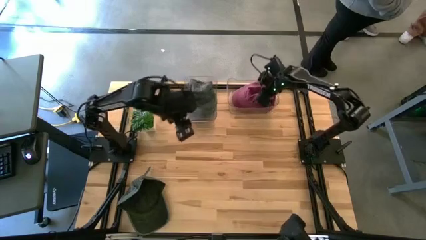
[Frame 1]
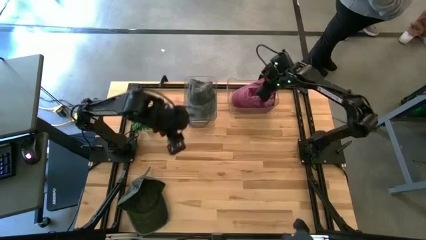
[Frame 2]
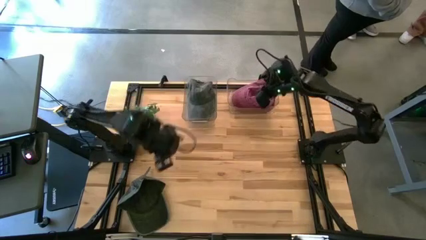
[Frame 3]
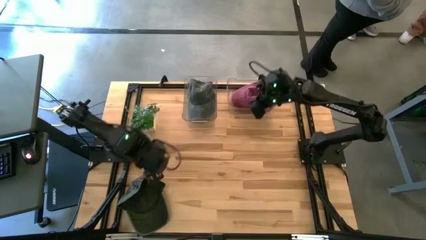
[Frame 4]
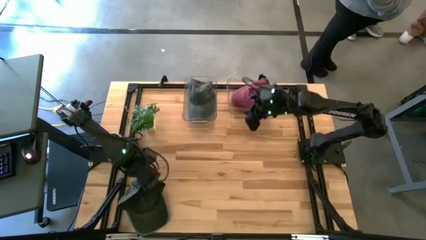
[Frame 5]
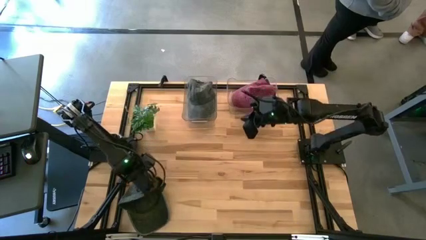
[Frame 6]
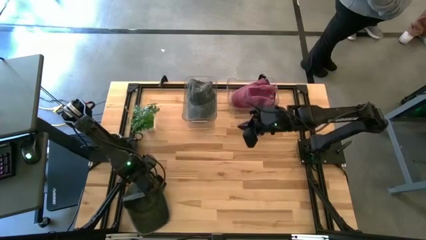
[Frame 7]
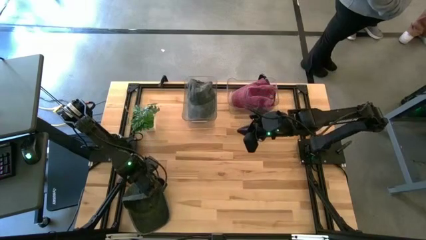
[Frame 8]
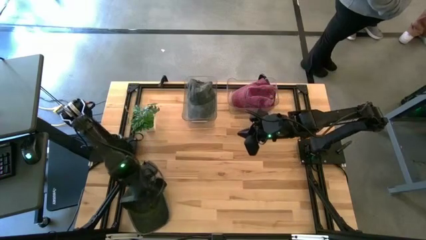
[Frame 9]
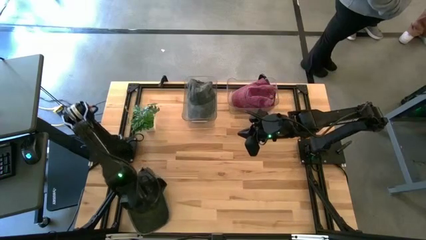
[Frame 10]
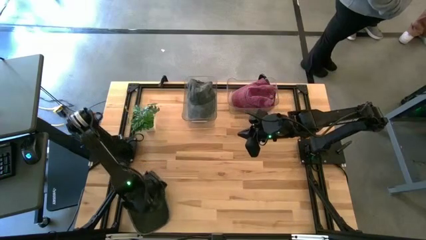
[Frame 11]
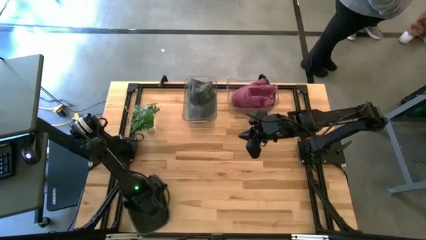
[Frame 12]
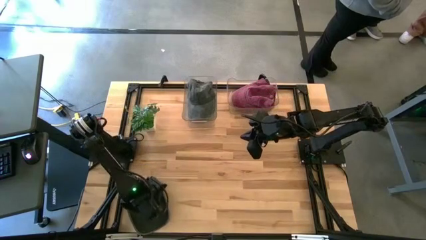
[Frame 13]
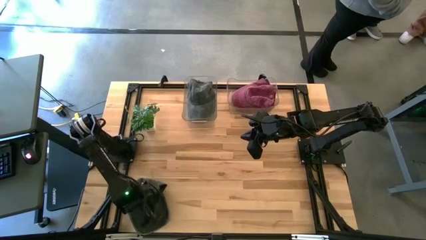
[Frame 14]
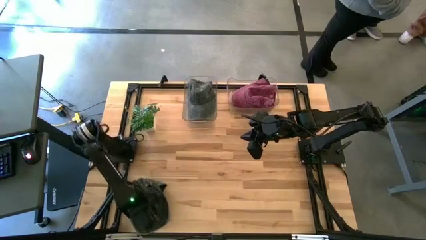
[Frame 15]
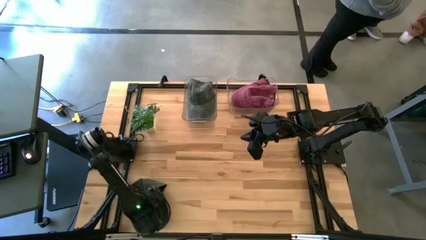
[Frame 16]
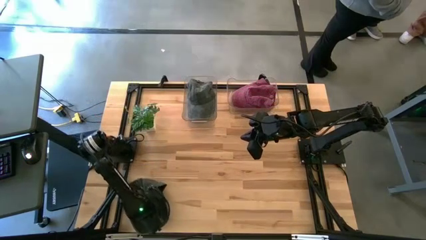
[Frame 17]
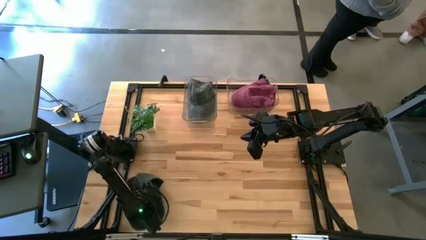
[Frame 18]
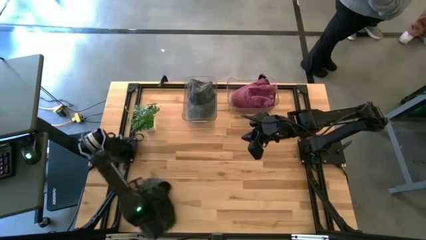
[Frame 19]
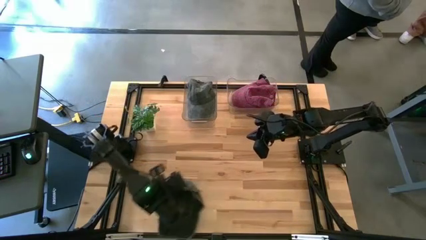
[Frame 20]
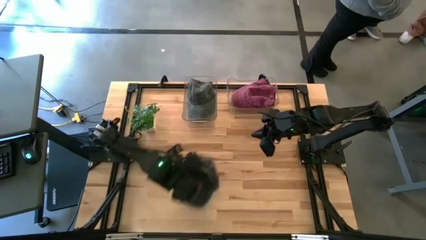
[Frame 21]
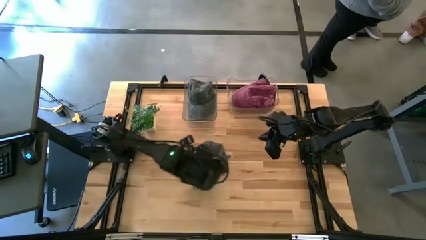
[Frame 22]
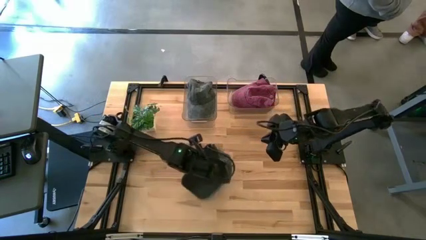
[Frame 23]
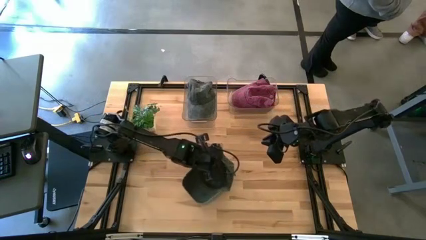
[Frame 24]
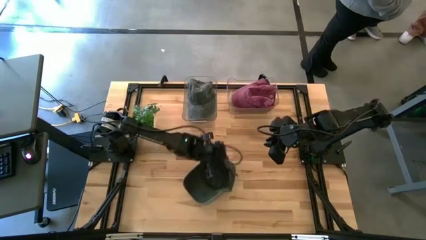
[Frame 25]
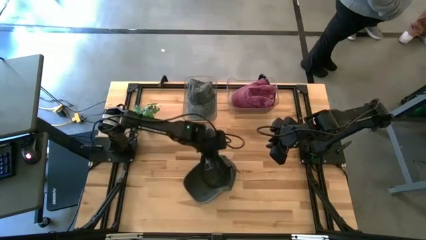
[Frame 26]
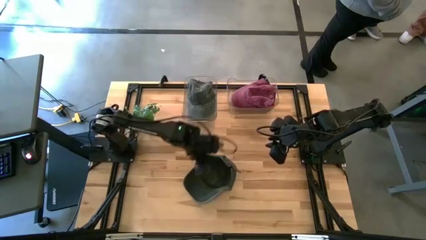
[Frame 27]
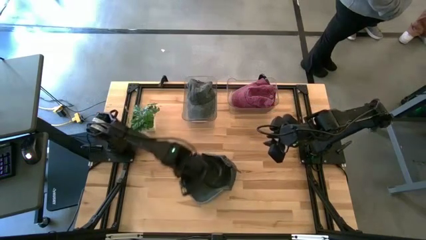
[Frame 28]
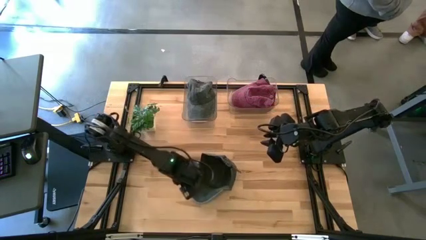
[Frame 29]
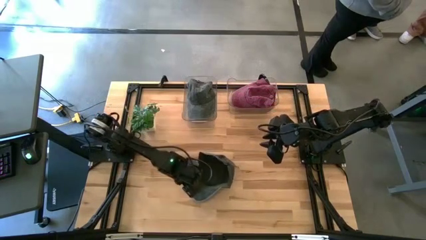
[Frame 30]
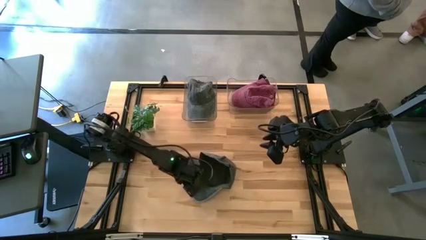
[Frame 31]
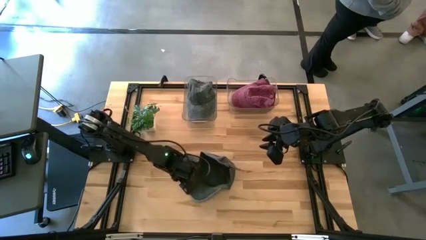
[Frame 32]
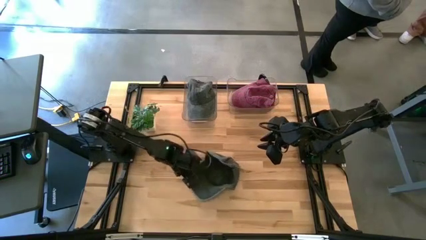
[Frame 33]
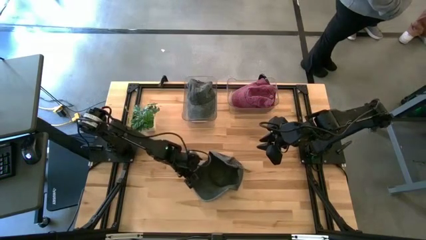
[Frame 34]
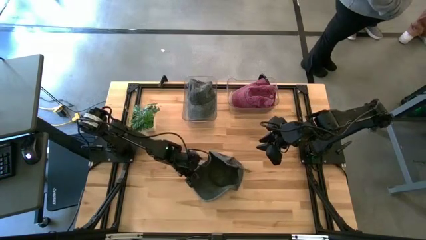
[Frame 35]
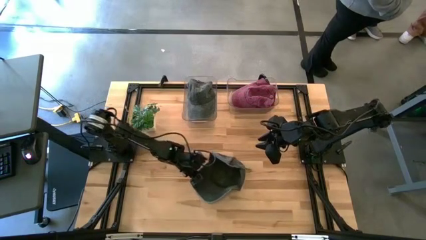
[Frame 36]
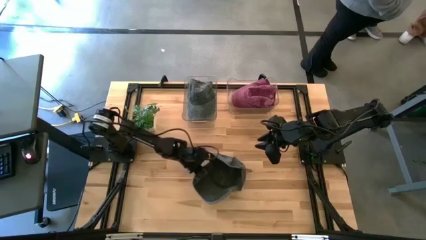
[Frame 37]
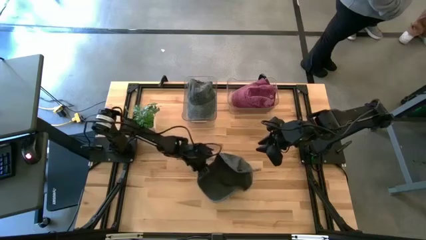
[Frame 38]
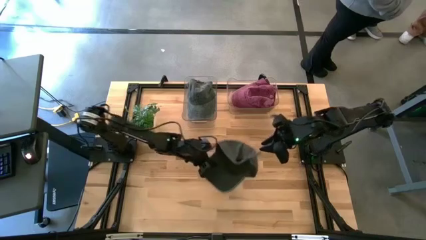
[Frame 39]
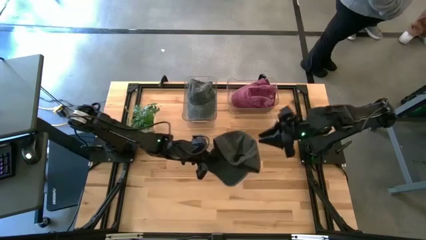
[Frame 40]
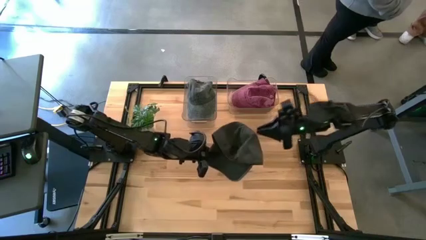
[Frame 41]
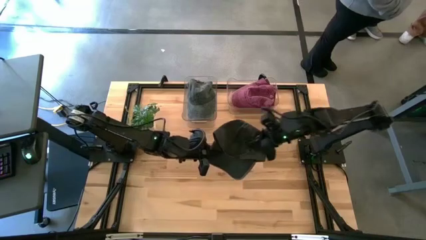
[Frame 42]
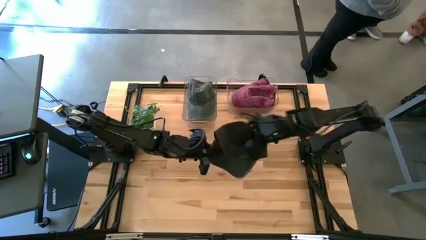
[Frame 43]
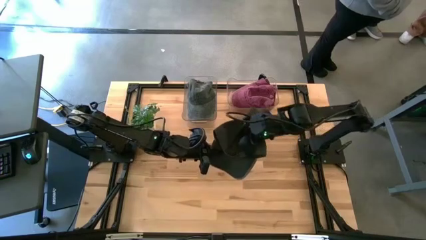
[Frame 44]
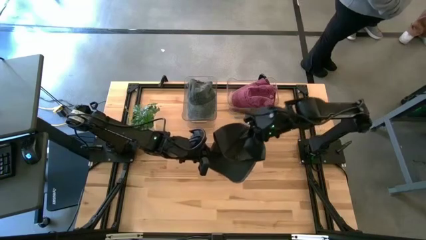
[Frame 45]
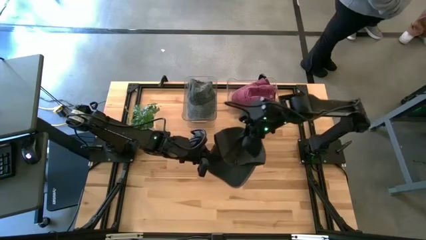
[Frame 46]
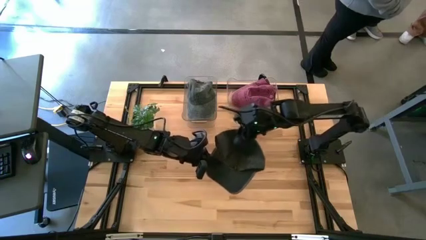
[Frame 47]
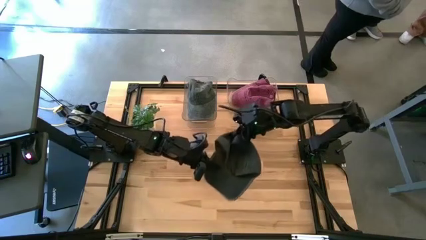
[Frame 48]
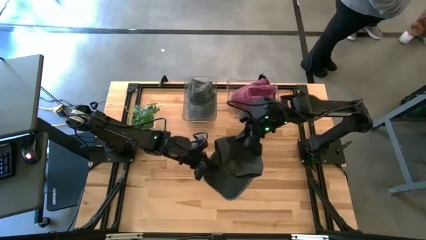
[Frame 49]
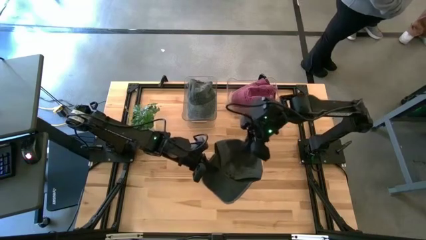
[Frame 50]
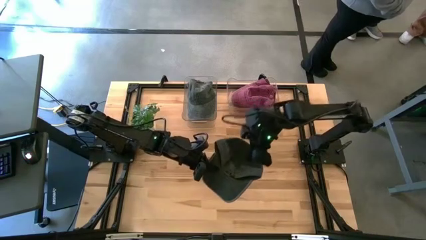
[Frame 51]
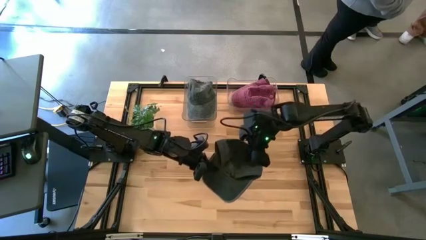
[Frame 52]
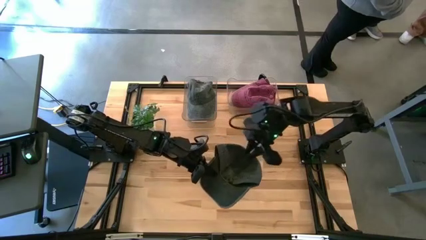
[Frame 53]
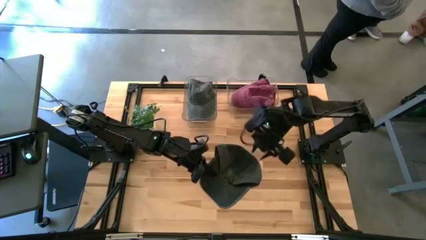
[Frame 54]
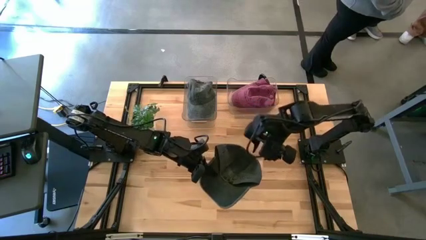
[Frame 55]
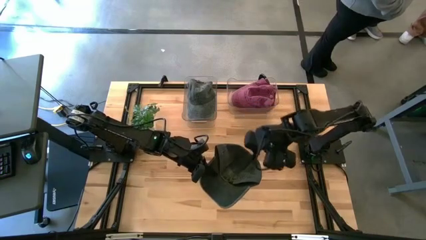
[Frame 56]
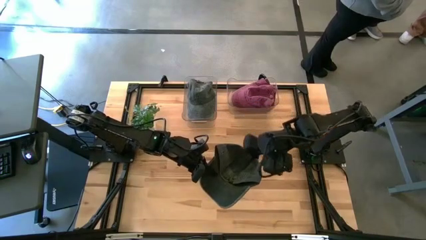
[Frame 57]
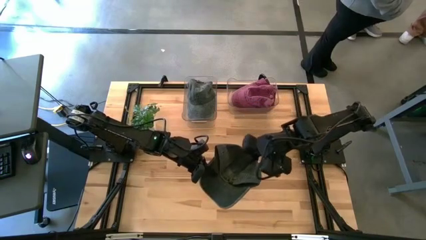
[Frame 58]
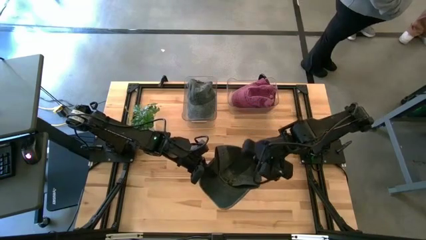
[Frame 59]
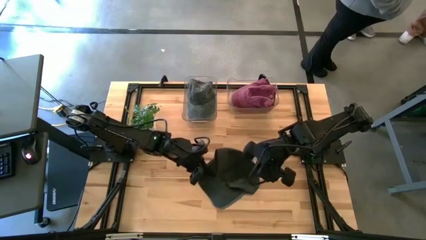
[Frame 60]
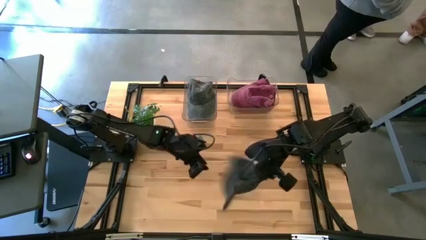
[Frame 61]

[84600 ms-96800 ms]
Task: Pick & Place hat
Put the black cap into the left transparent bin

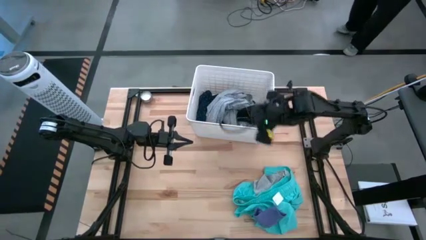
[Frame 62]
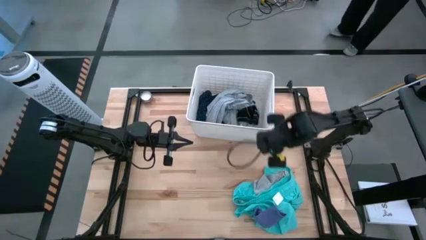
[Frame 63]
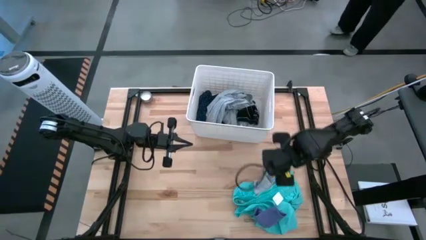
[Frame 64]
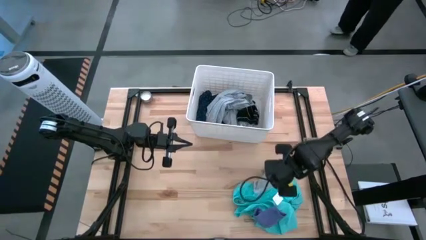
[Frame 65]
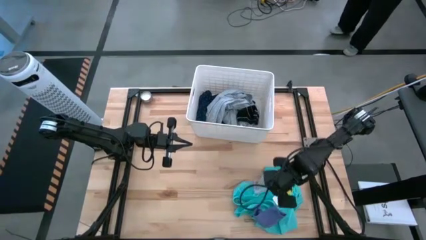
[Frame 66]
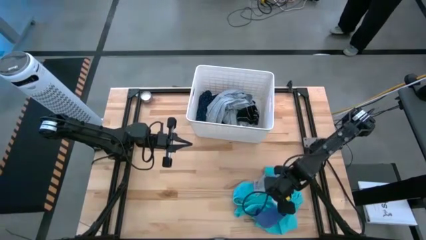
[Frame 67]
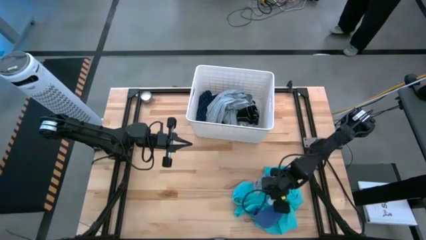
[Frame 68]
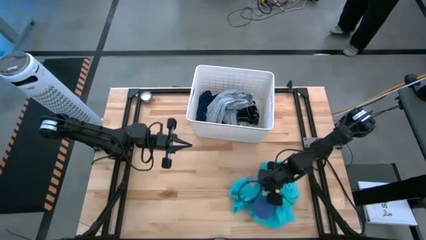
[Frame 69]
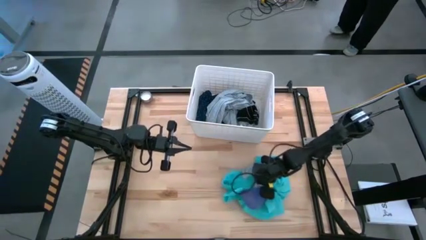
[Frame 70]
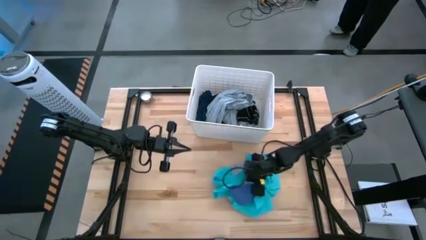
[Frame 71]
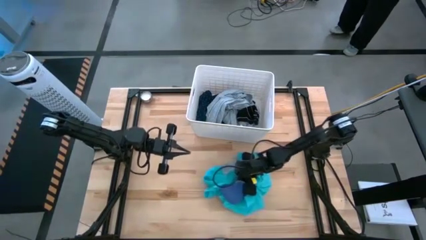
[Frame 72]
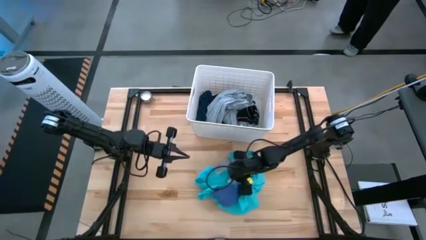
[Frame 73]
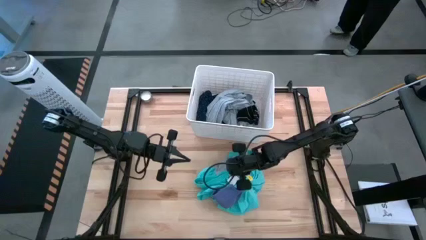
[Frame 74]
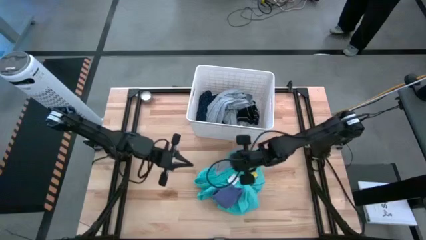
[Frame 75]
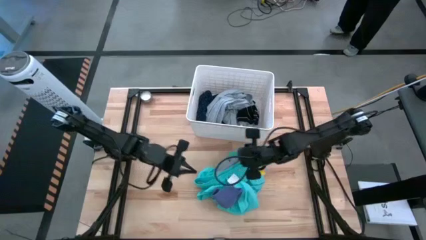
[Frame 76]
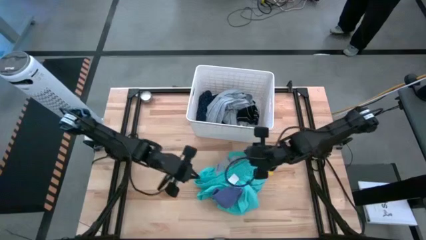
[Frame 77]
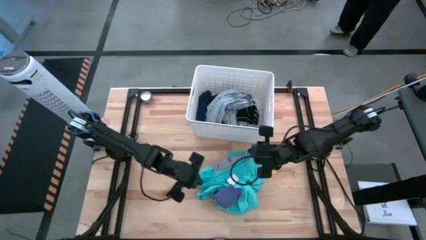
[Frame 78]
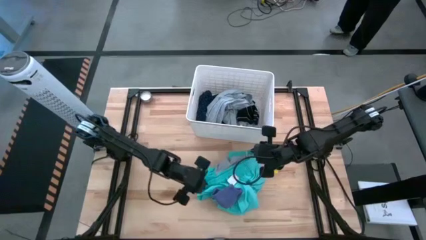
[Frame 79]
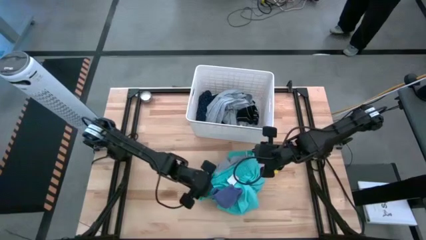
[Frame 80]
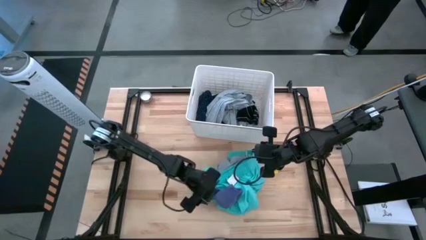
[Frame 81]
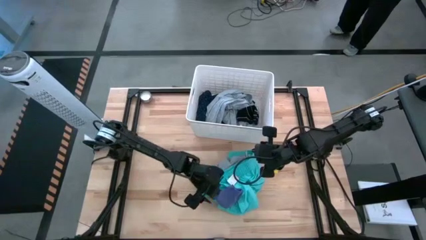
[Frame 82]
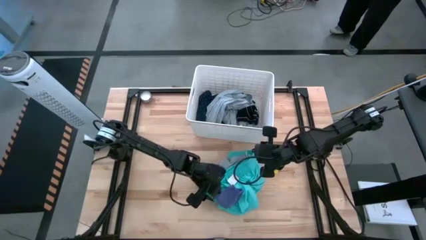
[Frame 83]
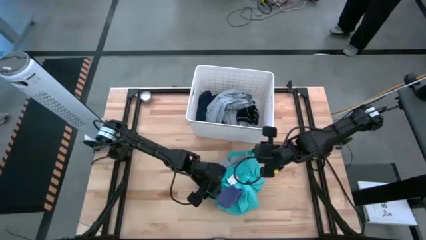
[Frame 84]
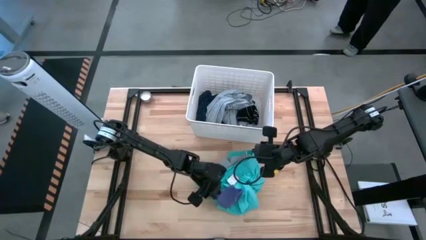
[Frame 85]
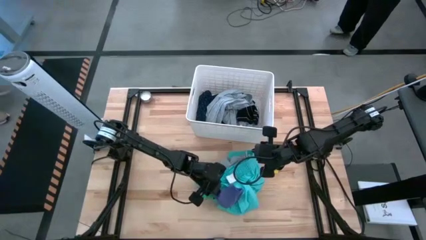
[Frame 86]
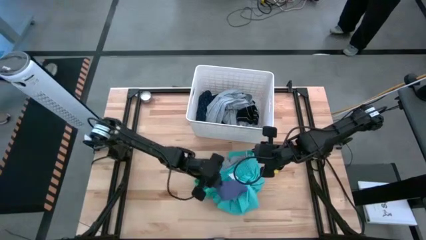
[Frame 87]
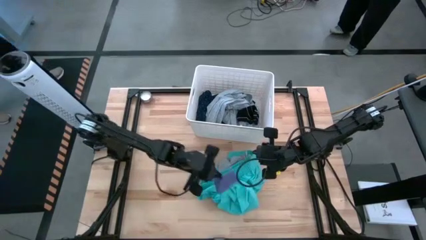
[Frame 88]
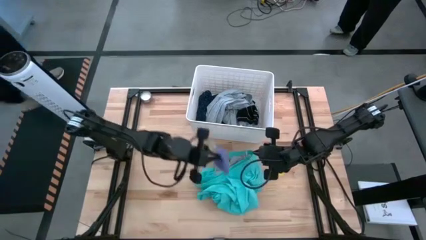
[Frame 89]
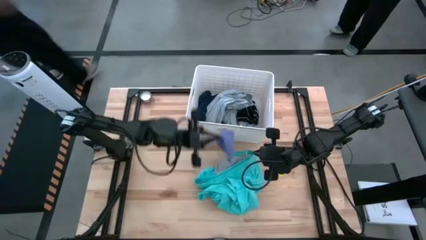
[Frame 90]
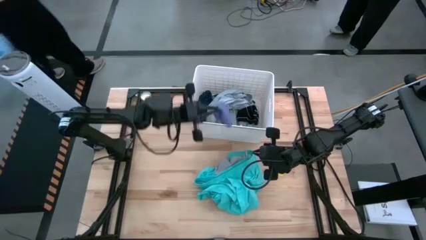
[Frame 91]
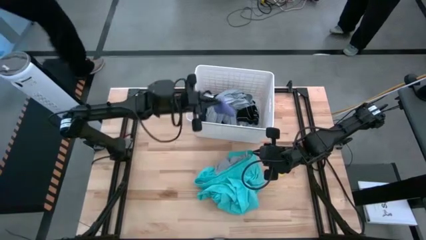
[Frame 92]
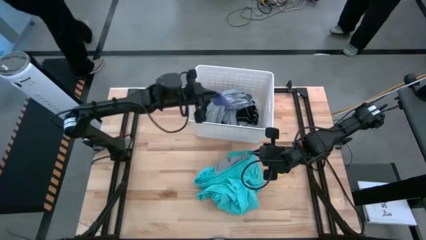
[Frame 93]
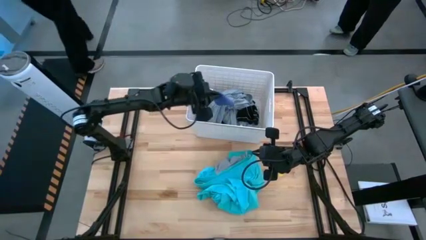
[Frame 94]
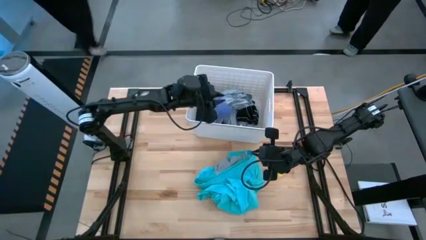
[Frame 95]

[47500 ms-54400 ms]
Task: Sort clothes
Put the purple sock into the laundry bin
